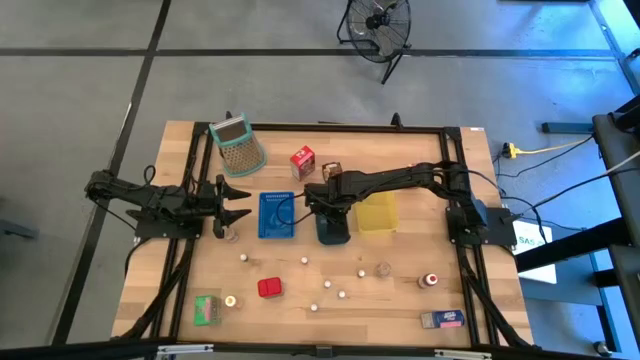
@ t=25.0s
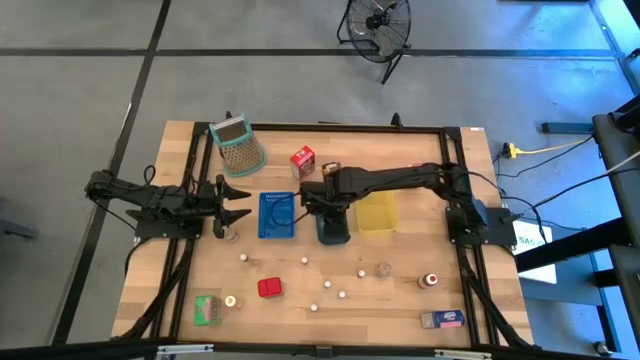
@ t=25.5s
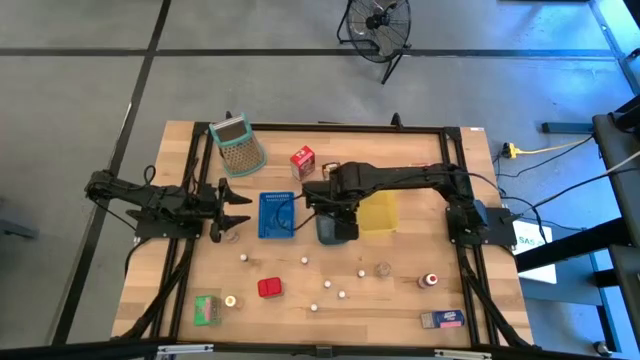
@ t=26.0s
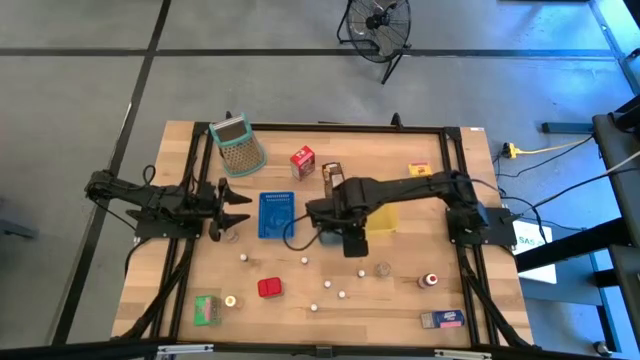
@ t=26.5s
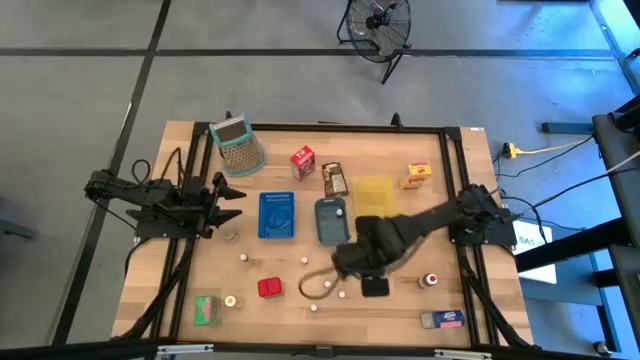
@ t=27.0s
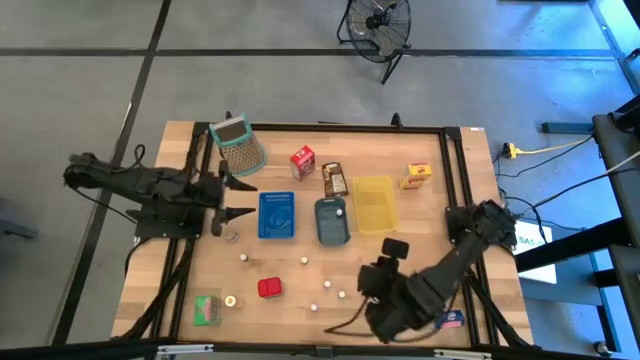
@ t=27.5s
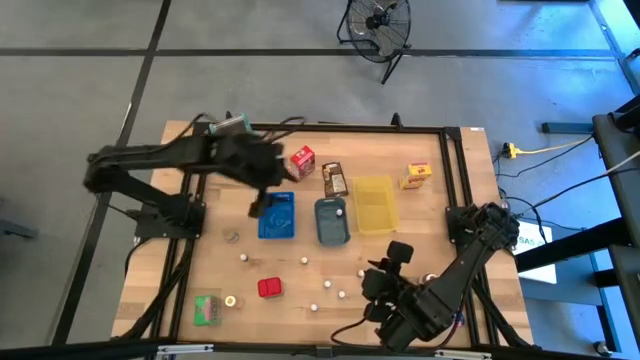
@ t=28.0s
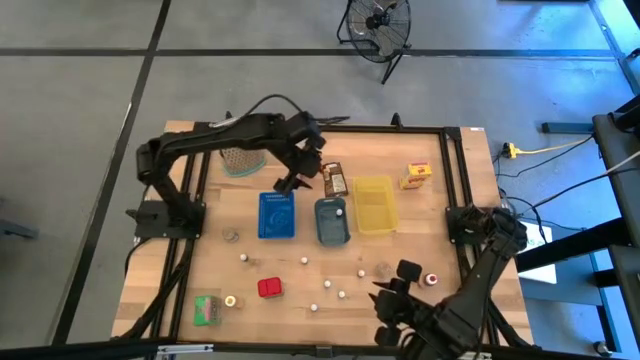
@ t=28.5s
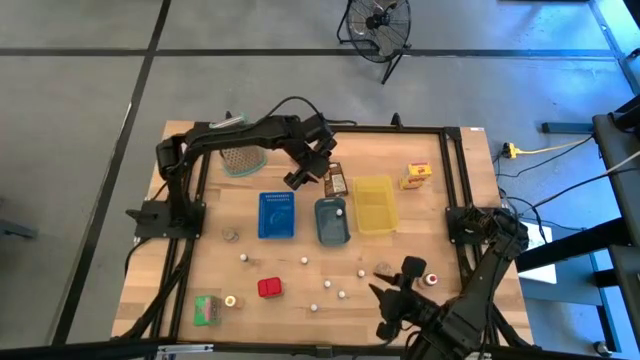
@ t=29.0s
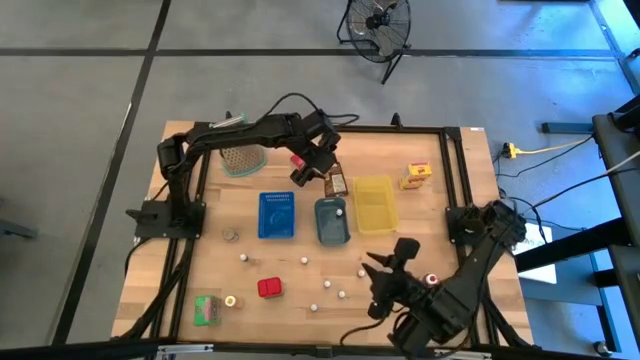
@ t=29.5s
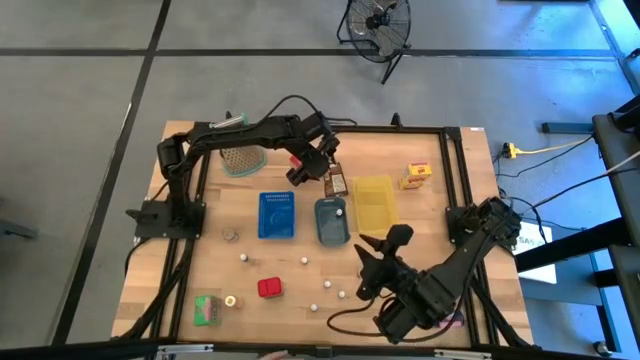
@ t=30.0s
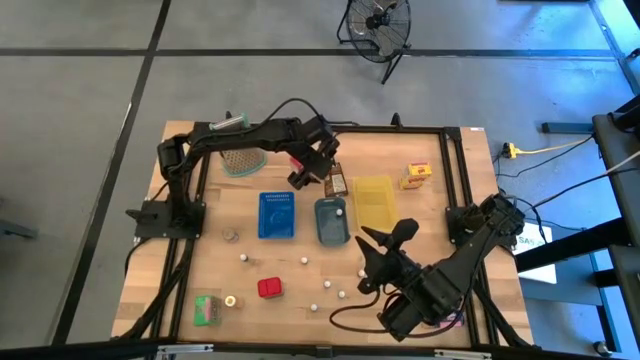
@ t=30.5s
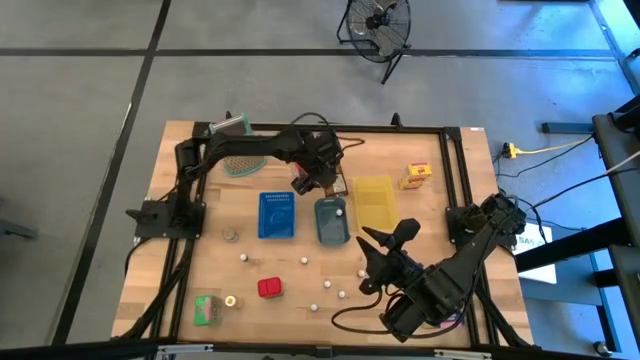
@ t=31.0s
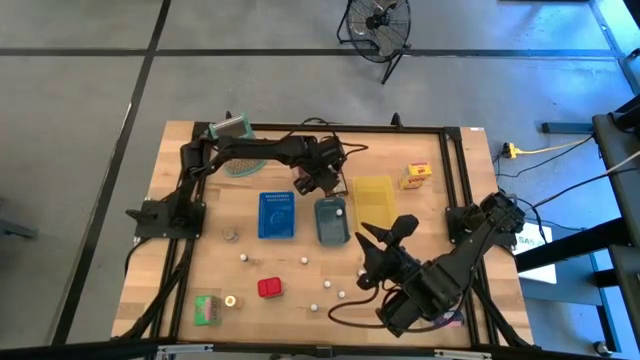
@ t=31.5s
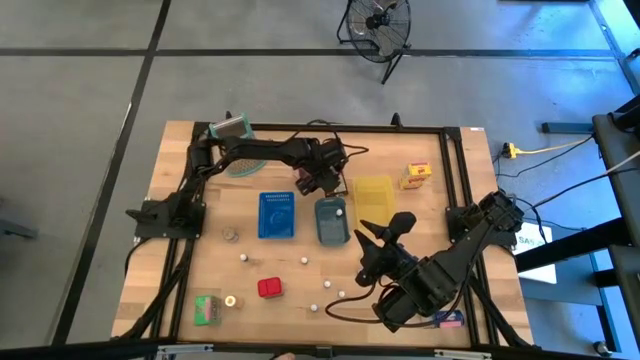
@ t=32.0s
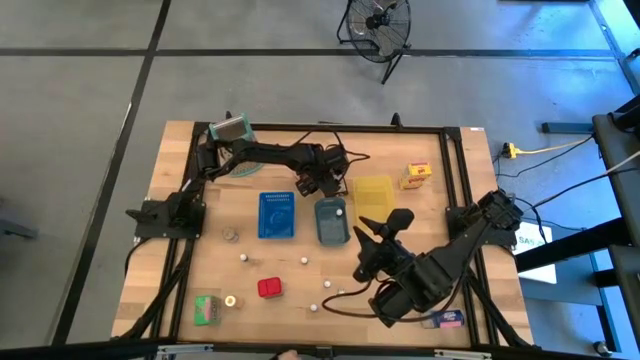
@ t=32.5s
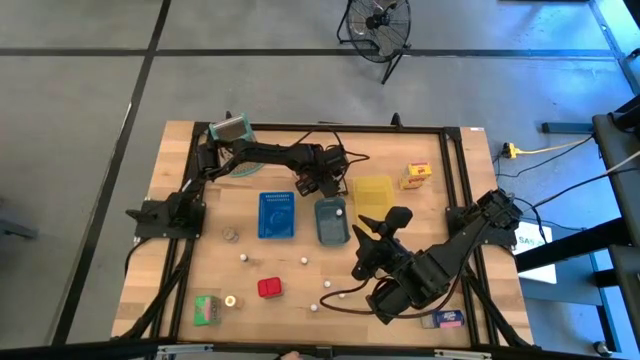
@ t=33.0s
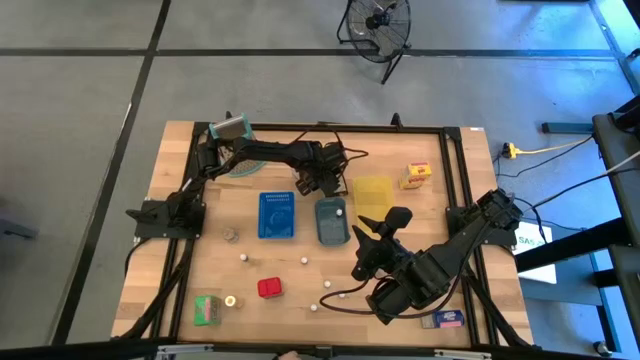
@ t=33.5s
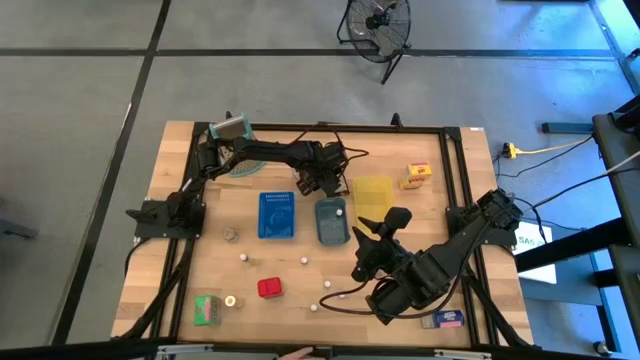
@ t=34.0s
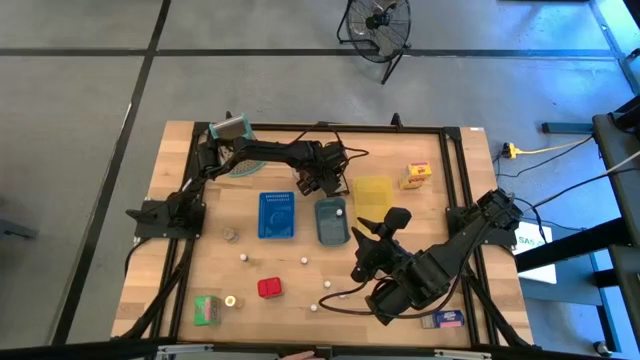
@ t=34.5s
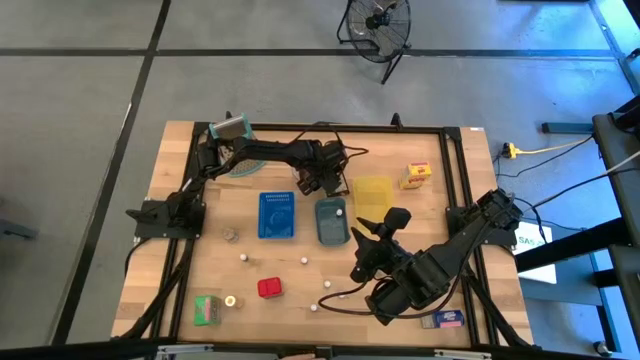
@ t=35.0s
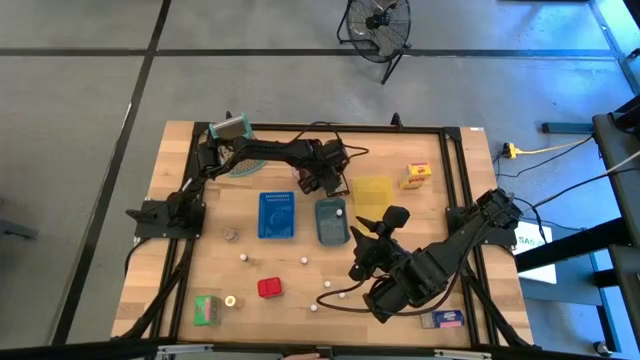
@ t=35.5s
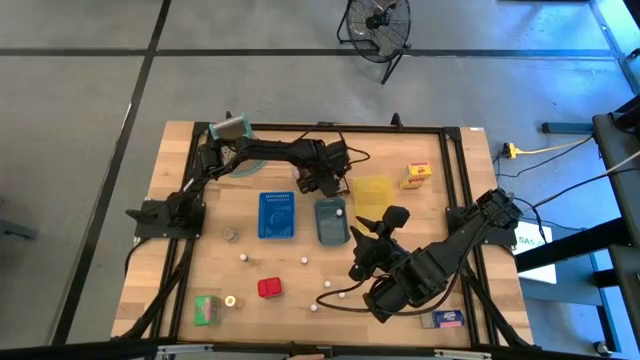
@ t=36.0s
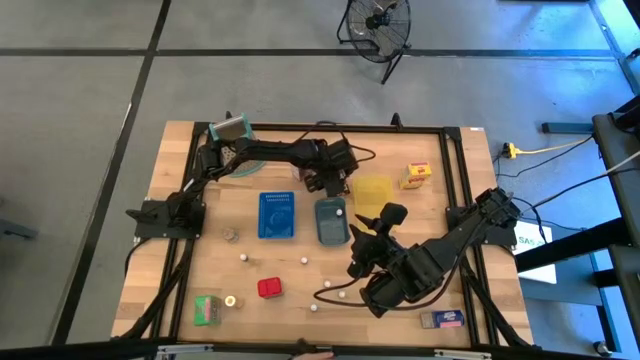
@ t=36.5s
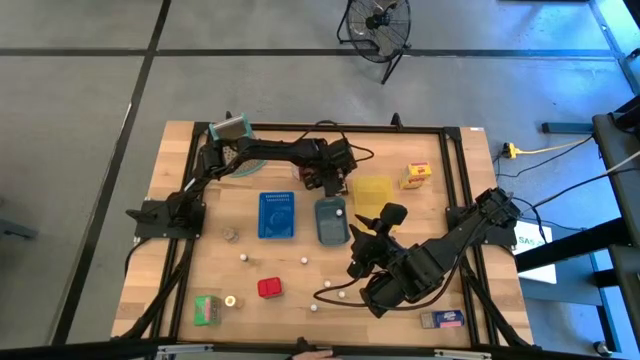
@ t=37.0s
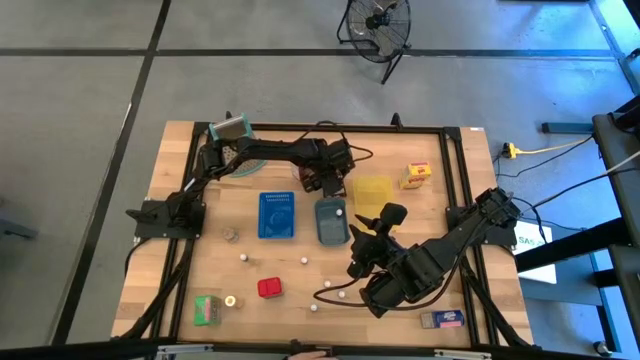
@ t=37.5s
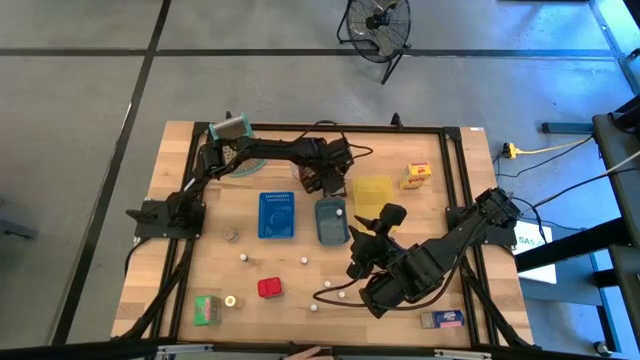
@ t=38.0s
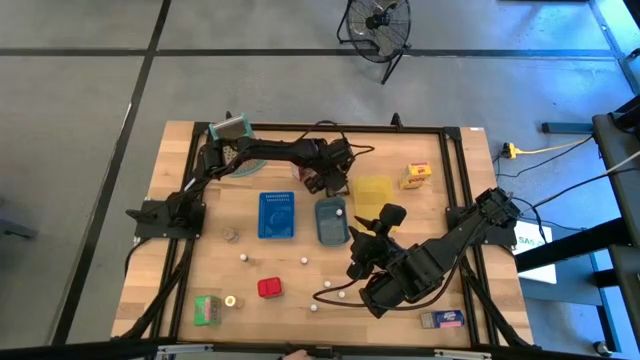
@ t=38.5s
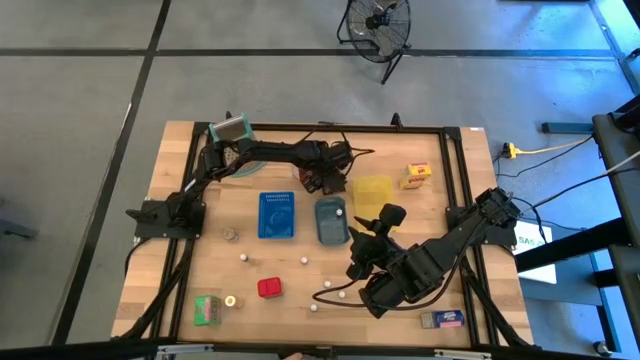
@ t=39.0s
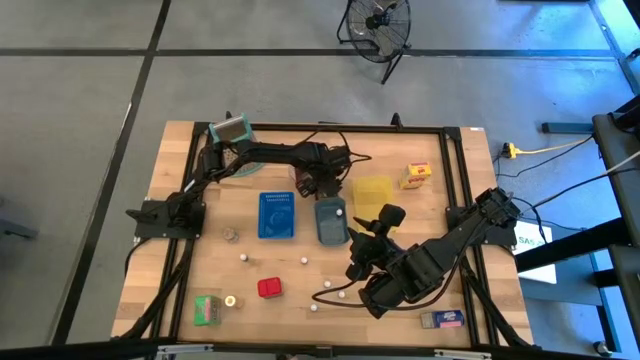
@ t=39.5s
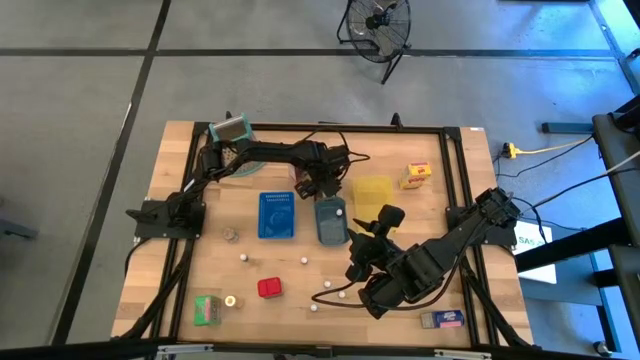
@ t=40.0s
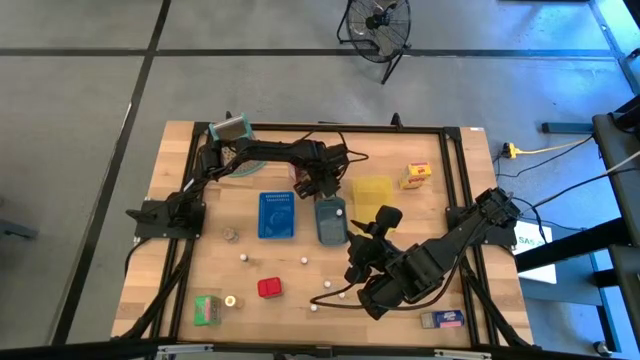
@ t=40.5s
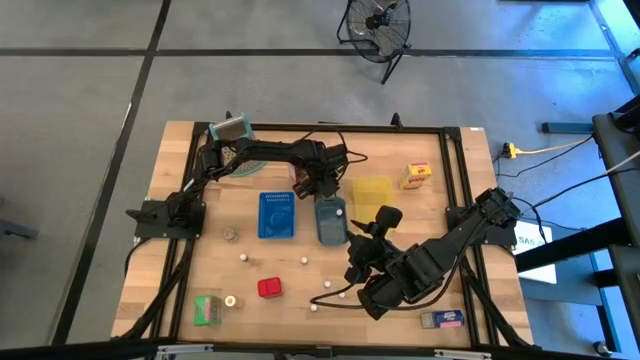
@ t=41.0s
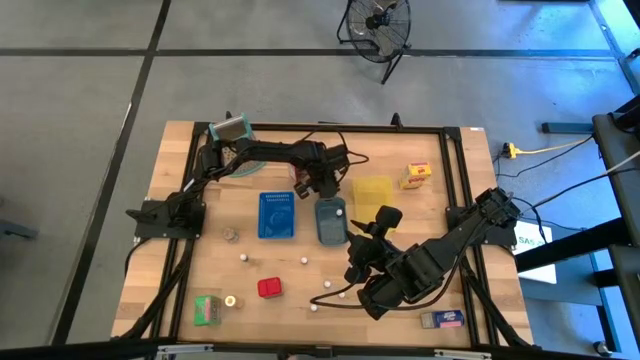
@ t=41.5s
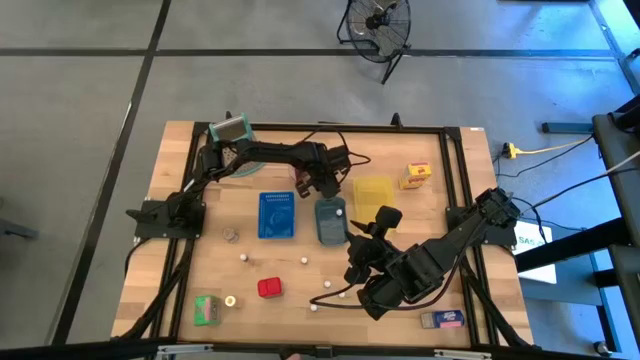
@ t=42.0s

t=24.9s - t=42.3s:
Task: Pick & Place Kitchen Items
Put the orange seasoning pack into the blue bin

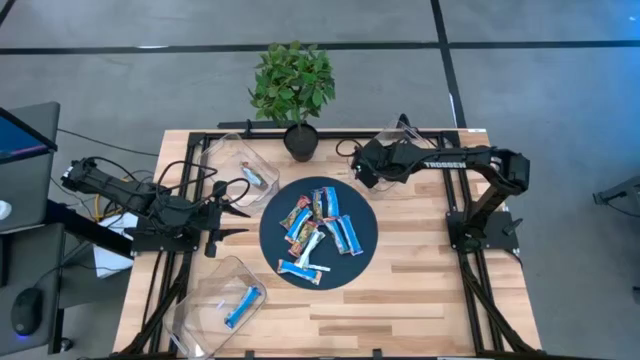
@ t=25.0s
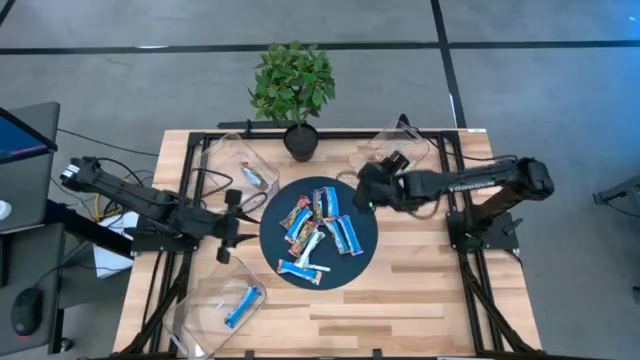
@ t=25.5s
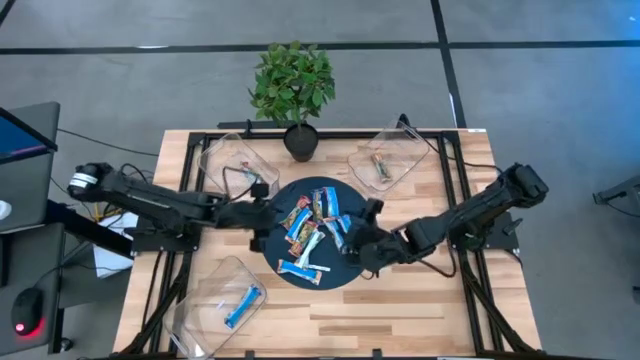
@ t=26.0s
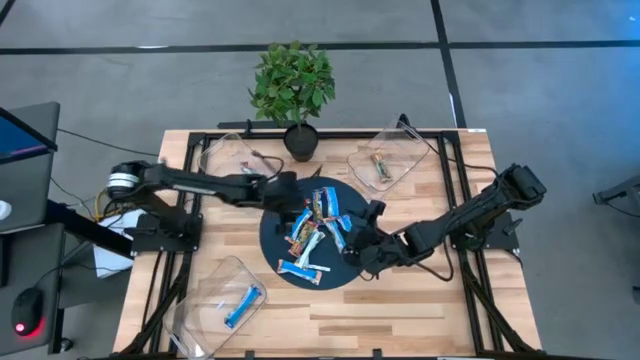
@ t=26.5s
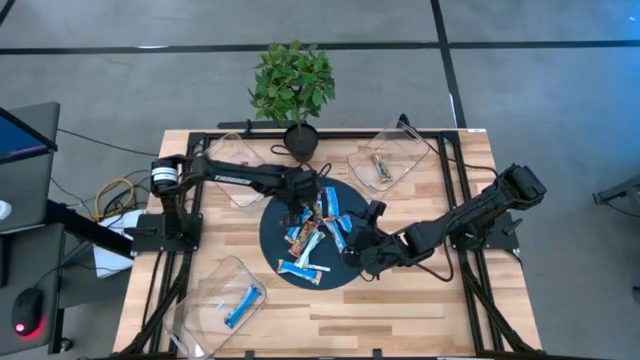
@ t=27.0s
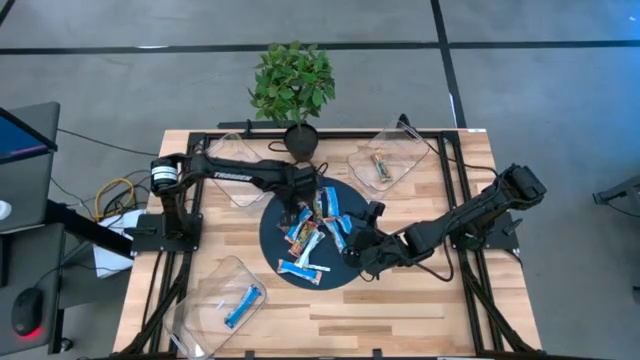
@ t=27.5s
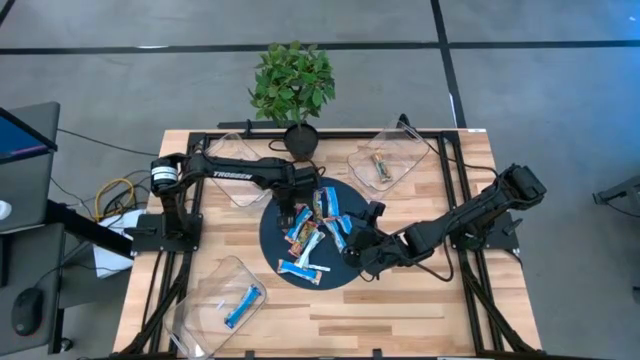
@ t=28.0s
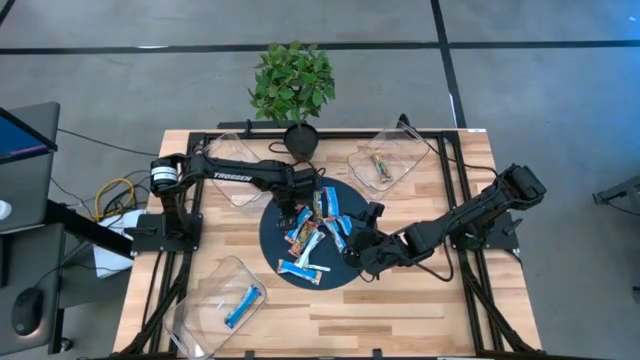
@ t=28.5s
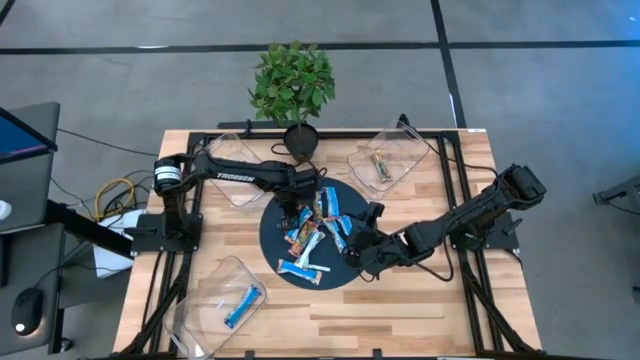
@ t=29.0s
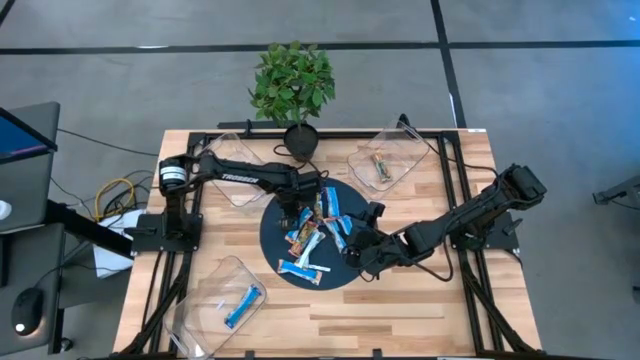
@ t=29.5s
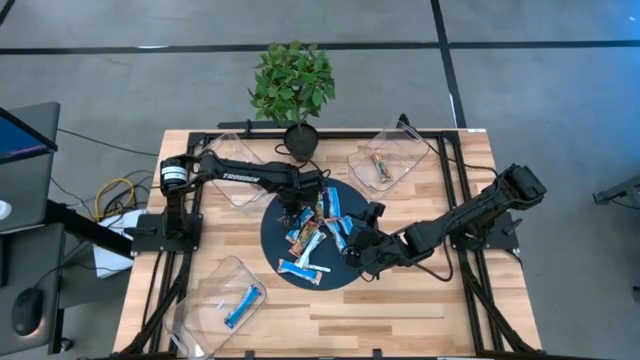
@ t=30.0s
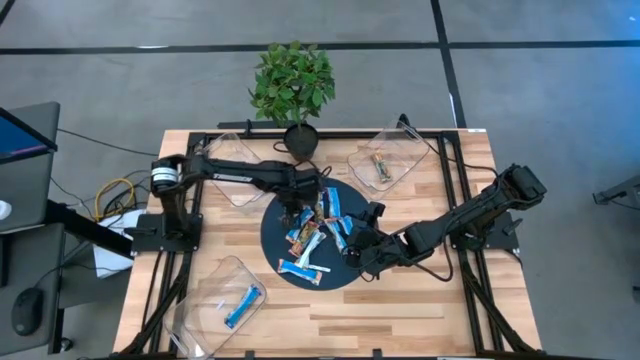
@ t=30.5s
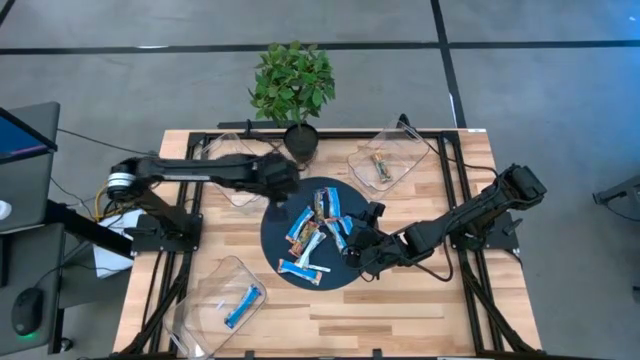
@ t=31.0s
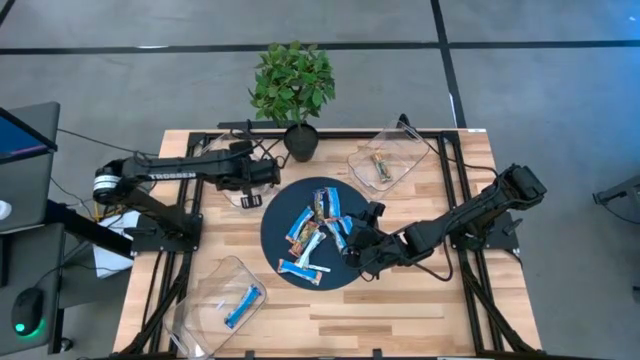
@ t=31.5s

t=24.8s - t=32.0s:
Task: Pick and place Granola Bars by type
Put the red granola bar into the top left bin
